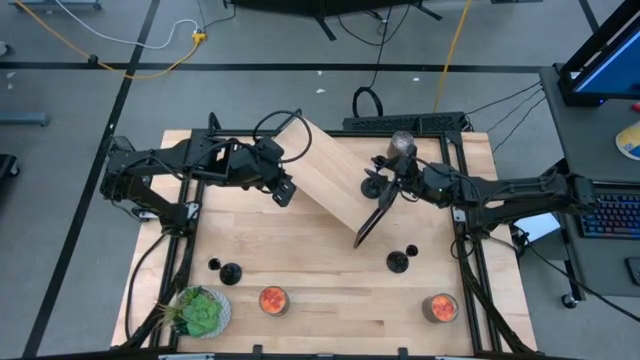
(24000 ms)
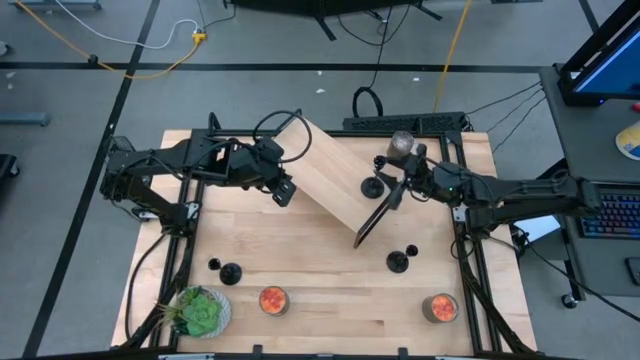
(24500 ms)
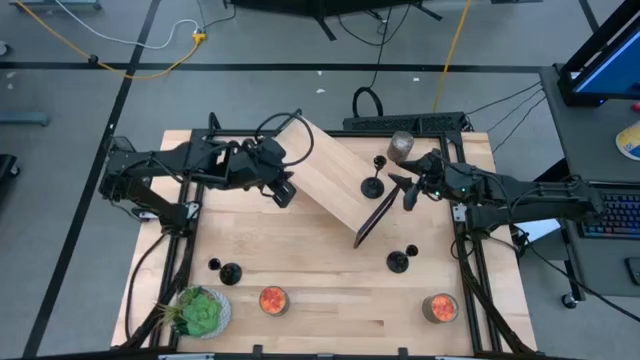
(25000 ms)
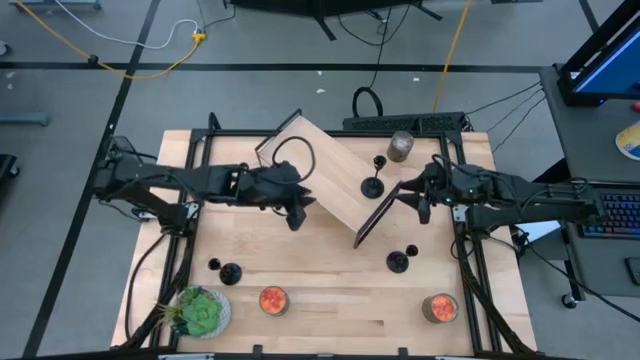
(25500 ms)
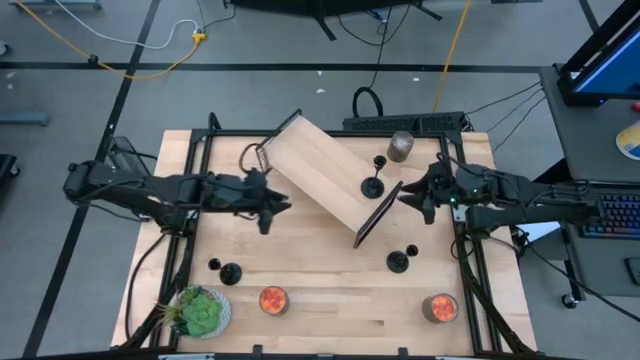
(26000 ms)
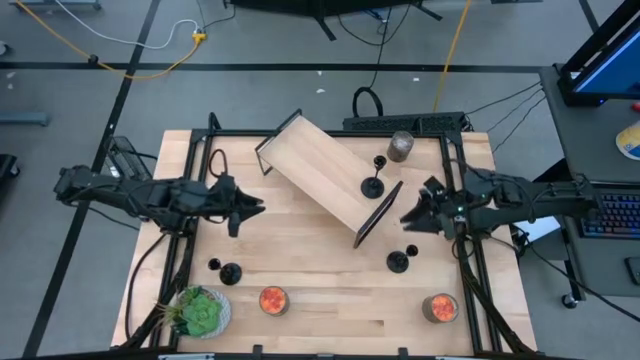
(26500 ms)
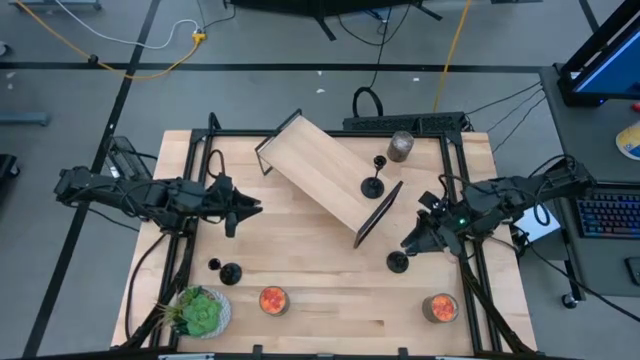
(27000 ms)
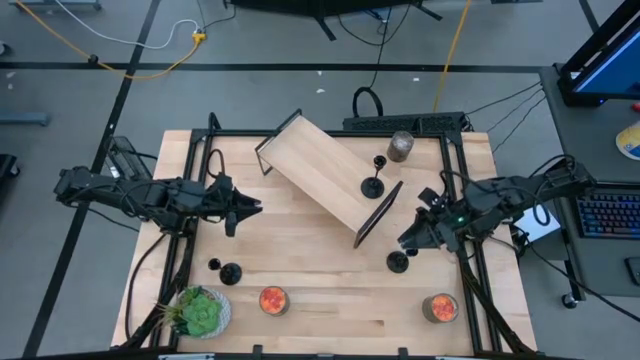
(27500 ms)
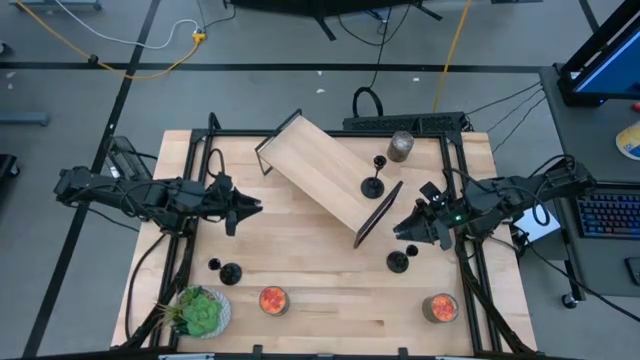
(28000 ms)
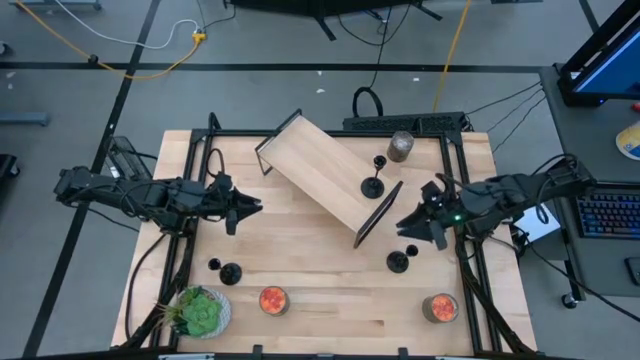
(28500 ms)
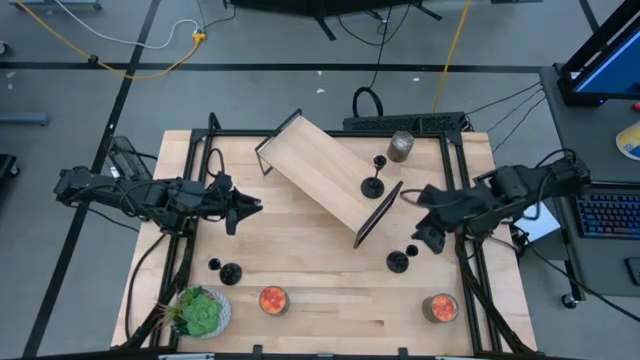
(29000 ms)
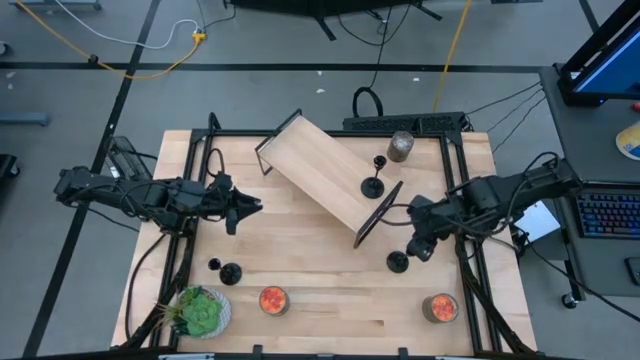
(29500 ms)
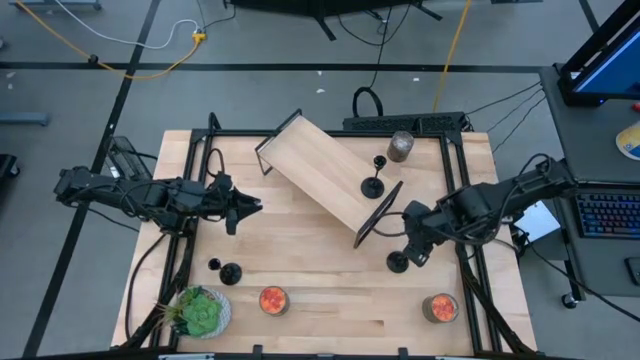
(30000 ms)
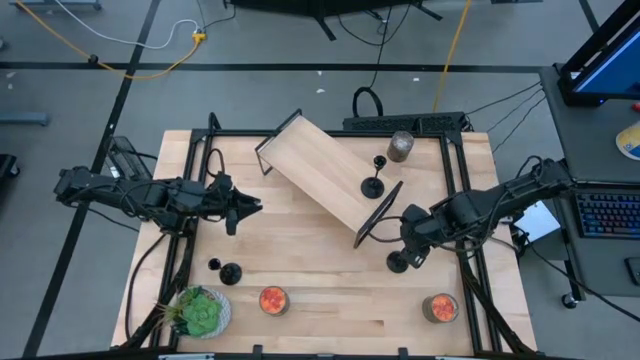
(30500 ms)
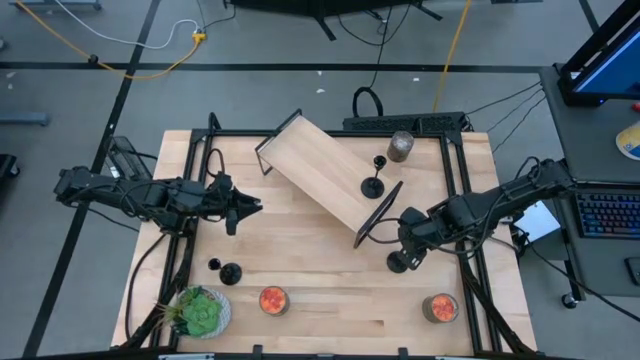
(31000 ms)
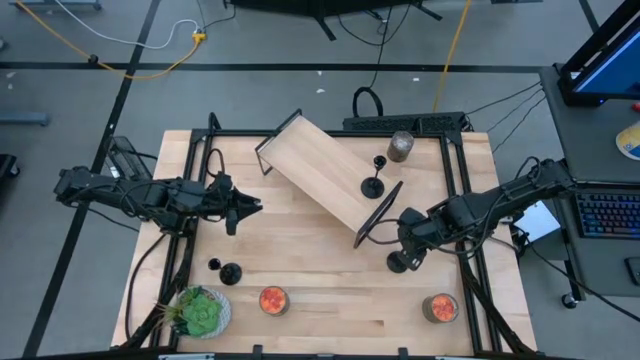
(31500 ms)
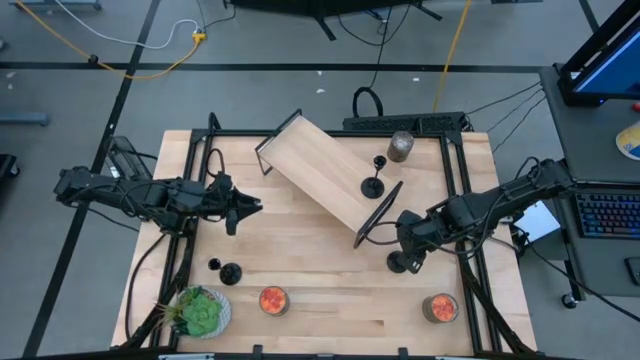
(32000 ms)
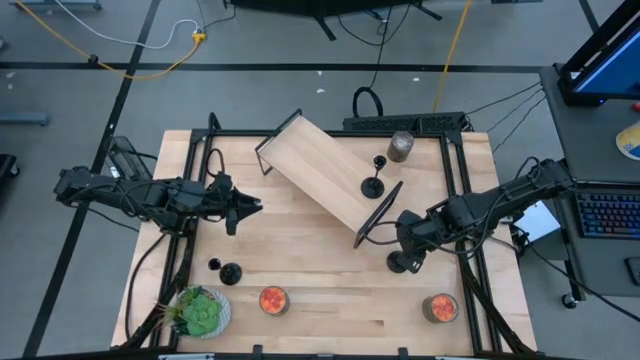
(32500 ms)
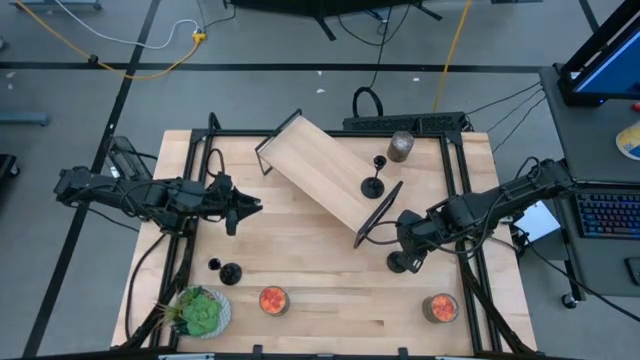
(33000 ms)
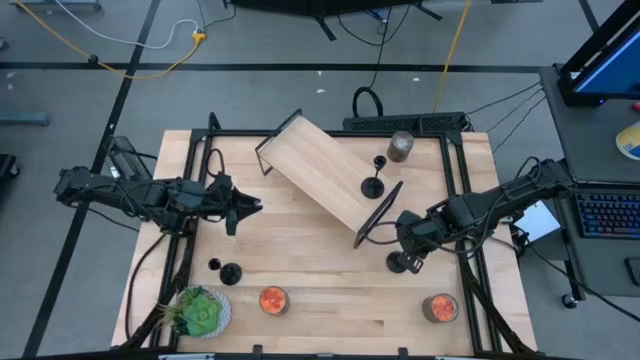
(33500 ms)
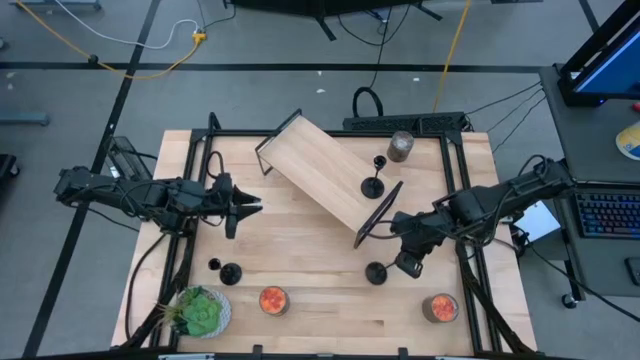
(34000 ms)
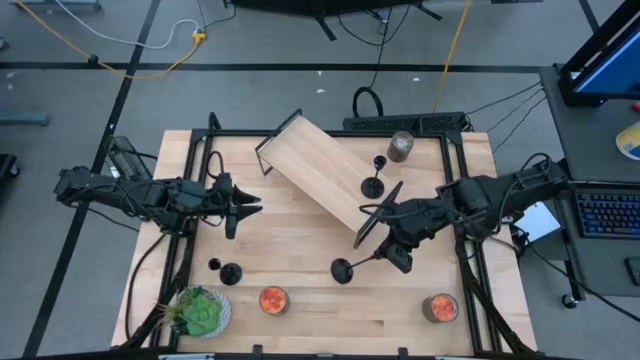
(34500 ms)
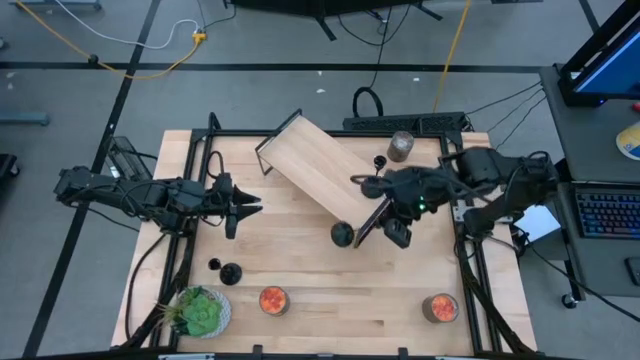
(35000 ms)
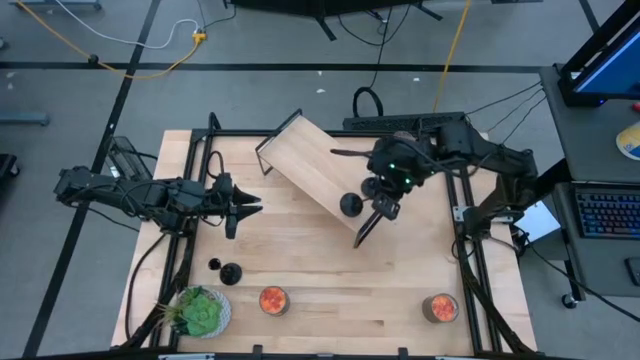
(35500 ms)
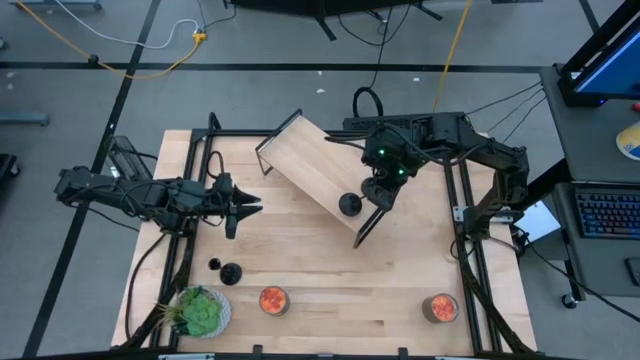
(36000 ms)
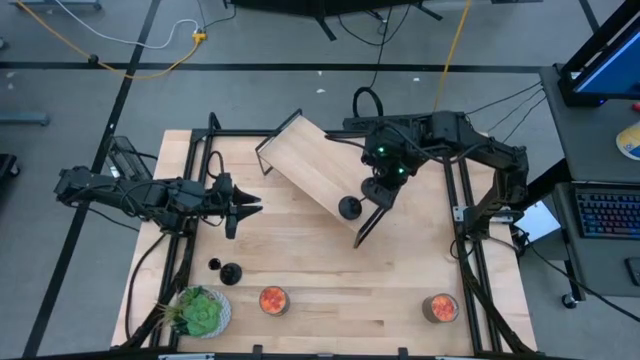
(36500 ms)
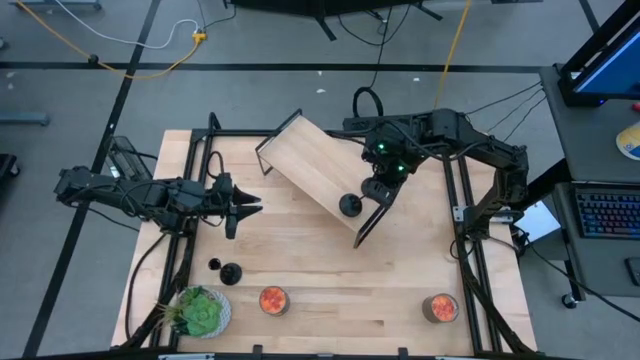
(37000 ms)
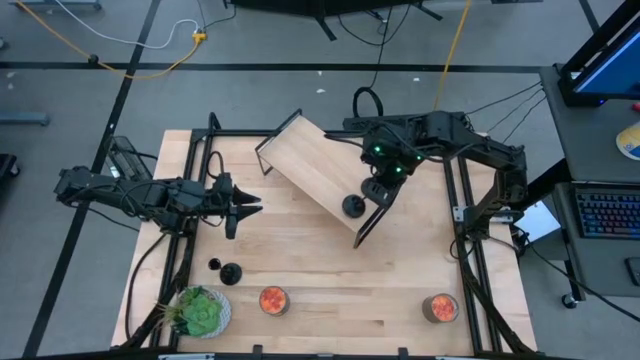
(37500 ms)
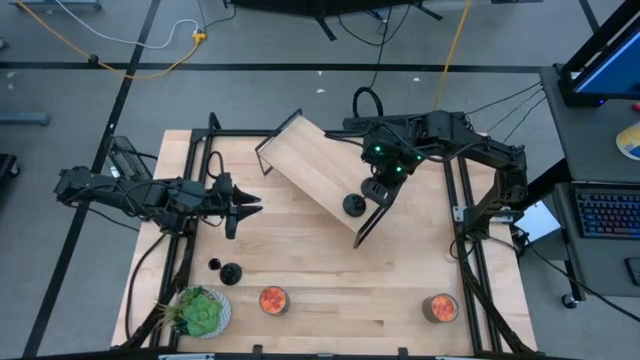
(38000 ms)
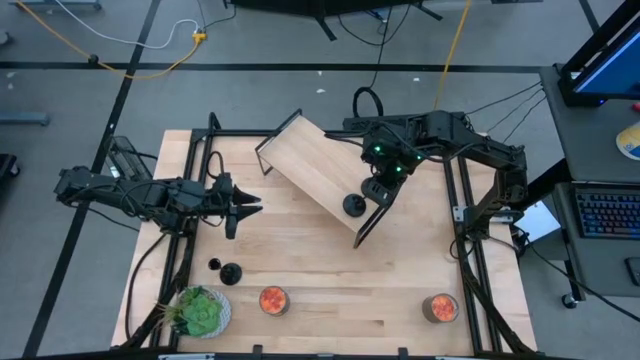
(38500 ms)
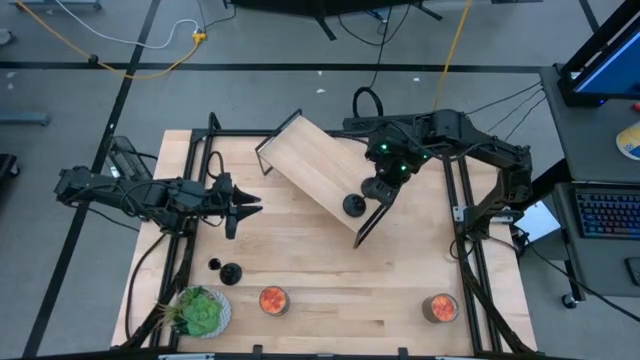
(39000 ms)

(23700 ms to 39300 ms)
Task: Pick & Place candle stick holders
Put the right black candle holder on the shelf

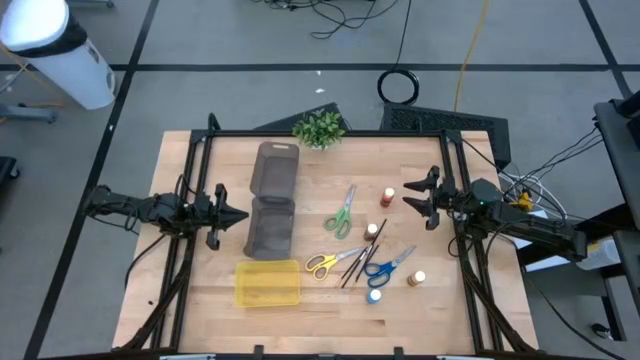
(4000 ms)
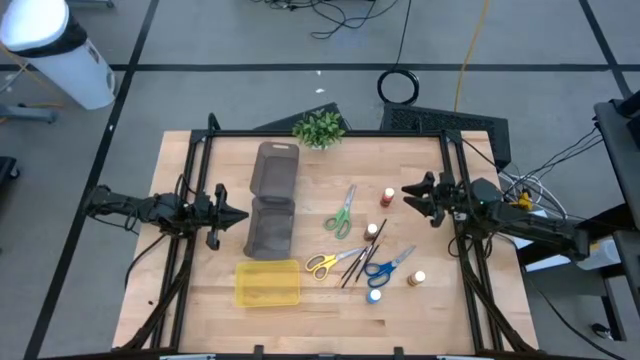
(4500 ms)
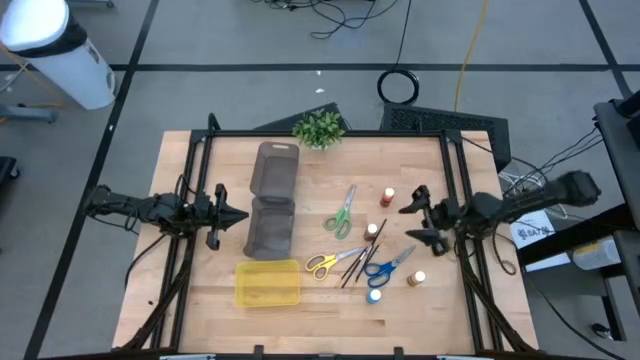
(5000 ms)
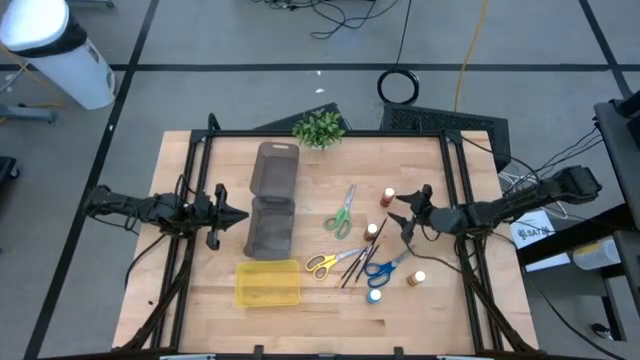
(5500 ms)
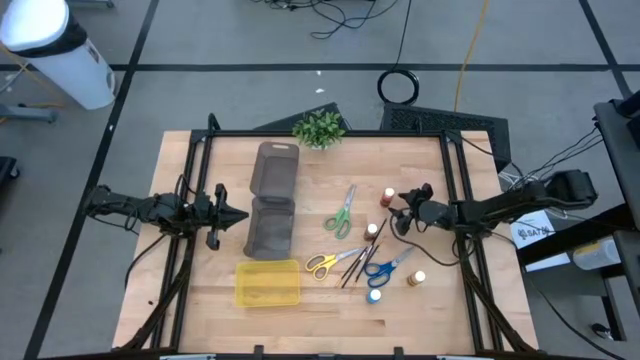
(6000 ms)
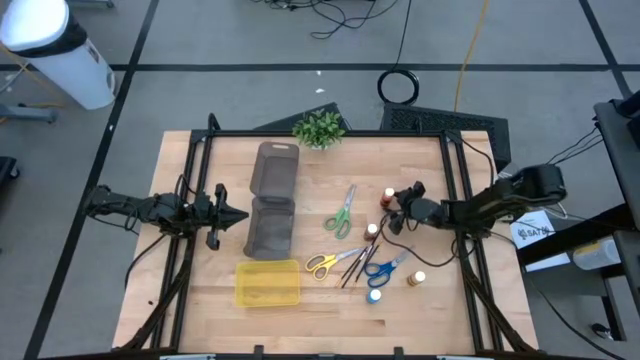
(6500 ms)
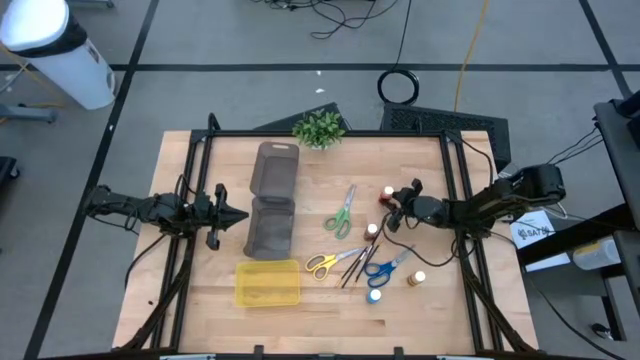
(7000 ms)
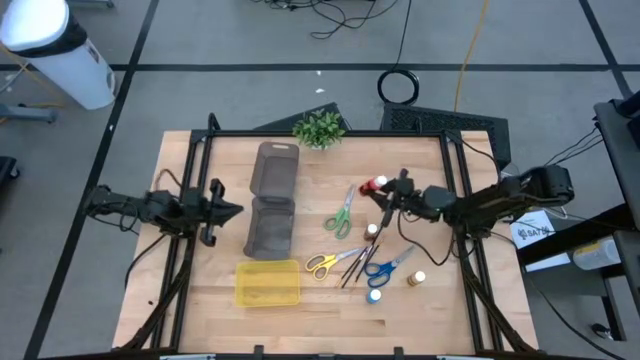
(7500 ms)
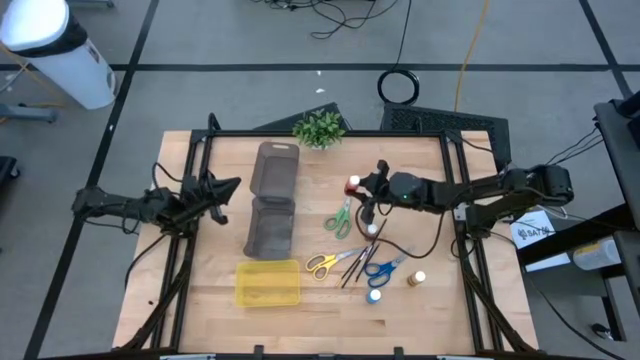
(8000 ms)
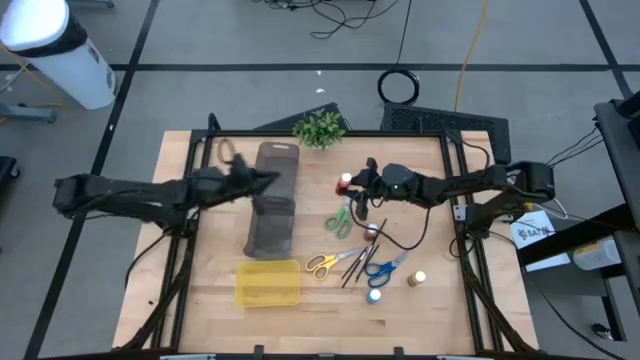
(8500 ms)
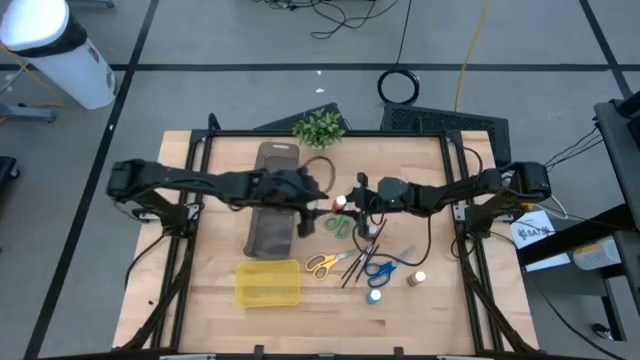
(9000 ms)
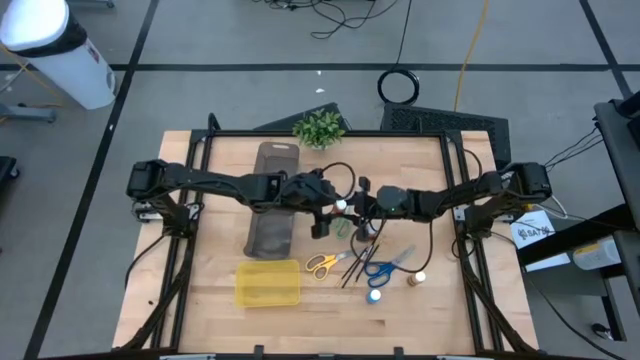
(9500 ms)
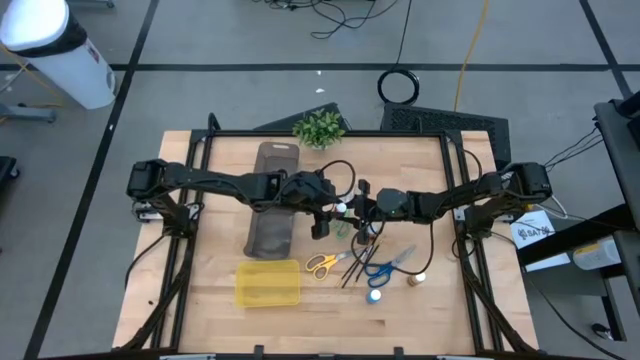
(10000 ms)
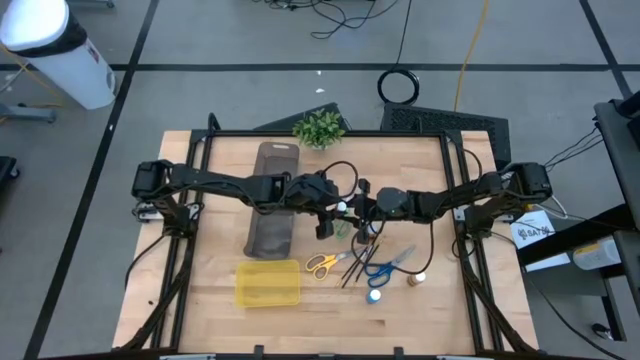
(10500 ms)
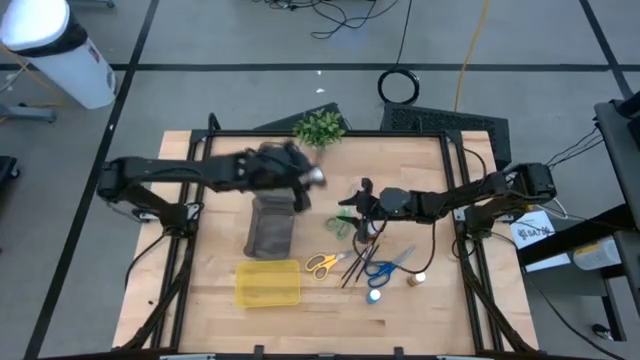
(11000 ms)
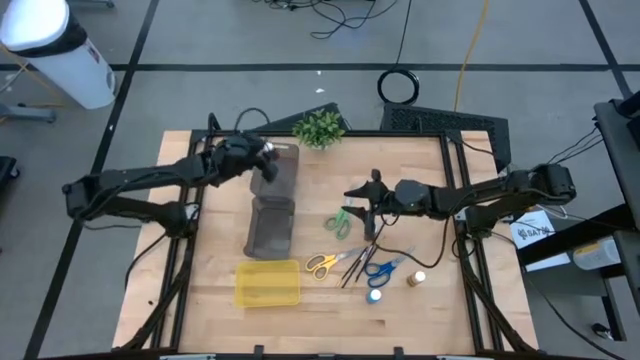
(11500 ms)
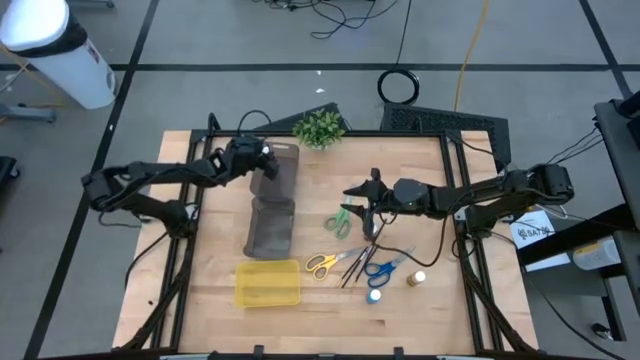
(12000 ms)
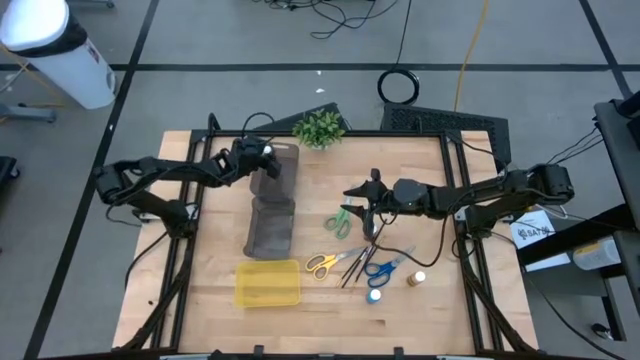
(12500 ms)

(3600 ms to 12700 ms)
Task: Pick & Place Paint Supplies
Put the orange paint bottle into the top black bin
